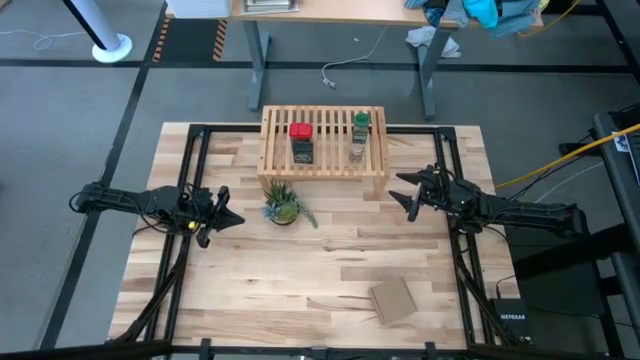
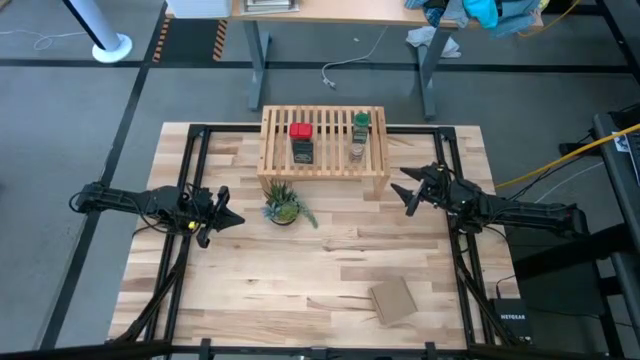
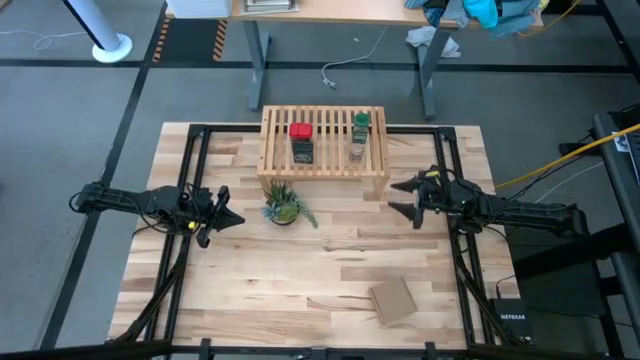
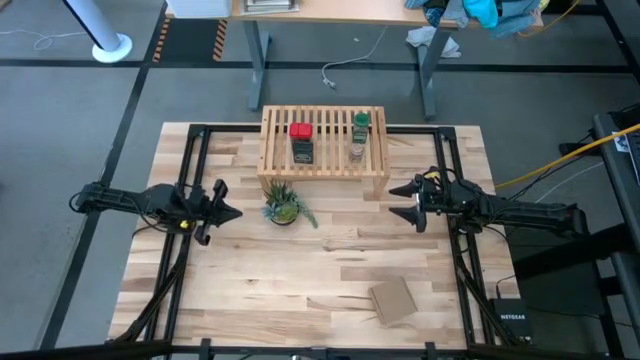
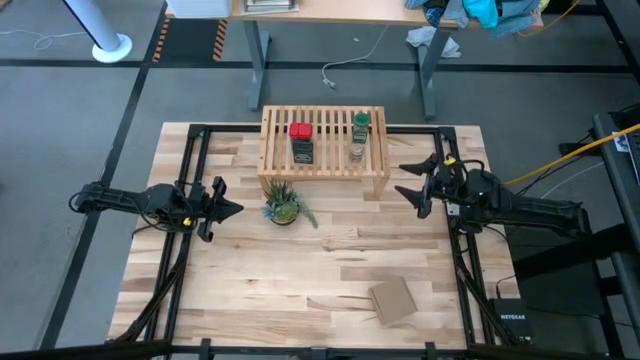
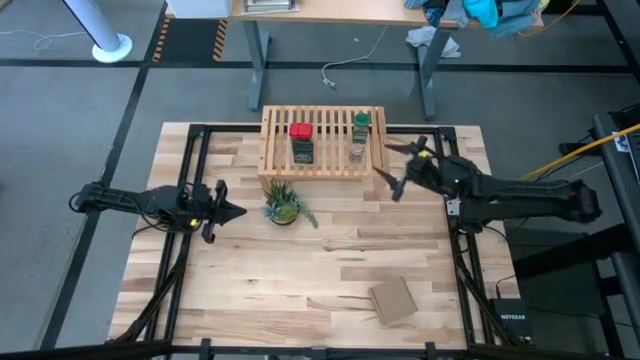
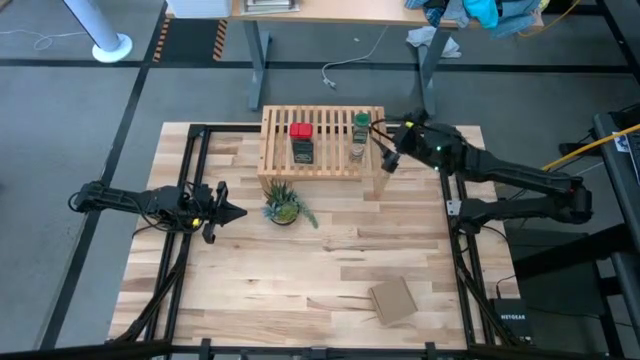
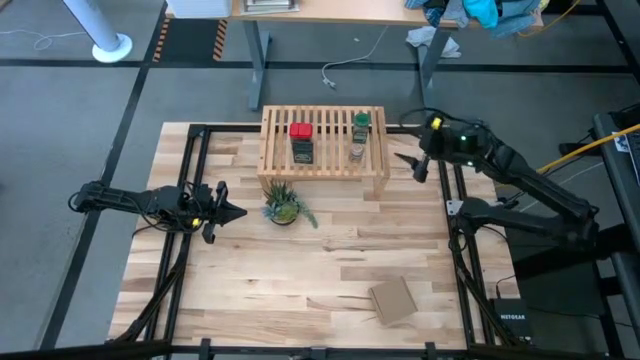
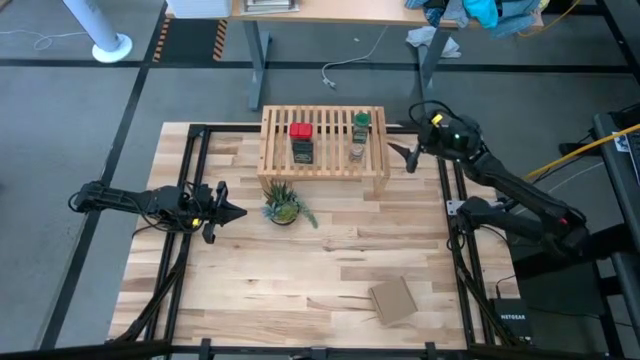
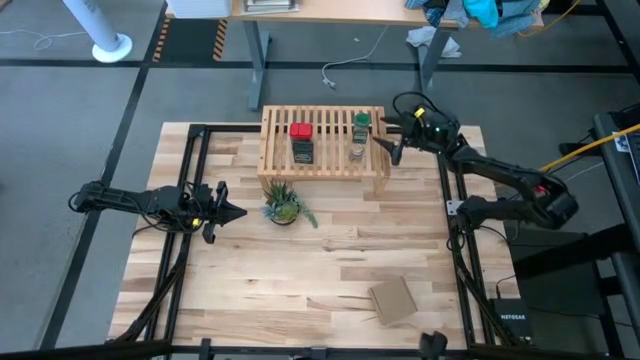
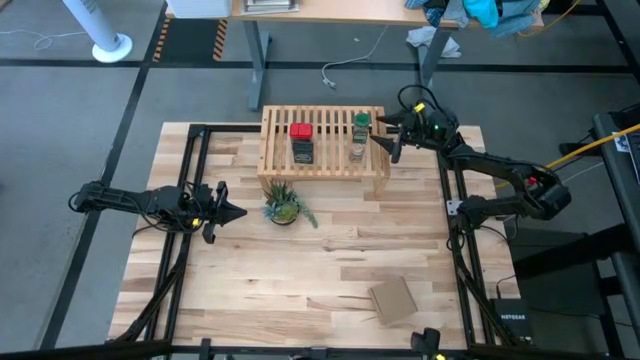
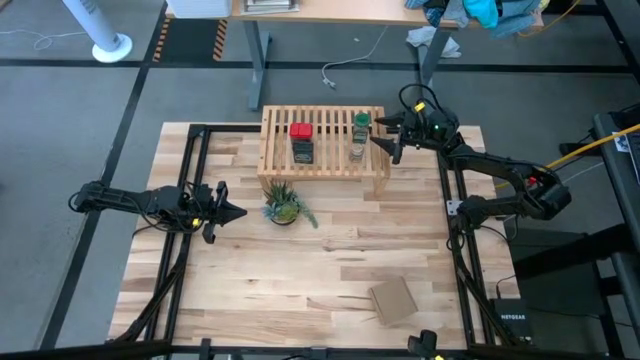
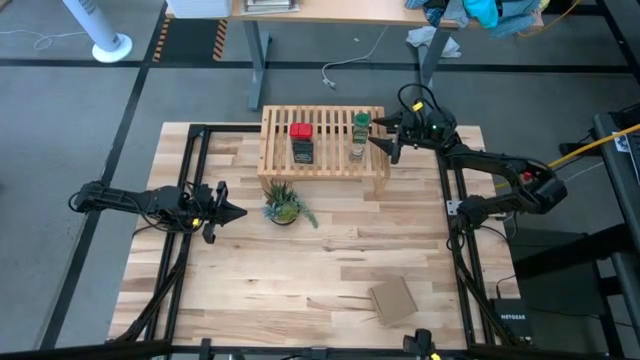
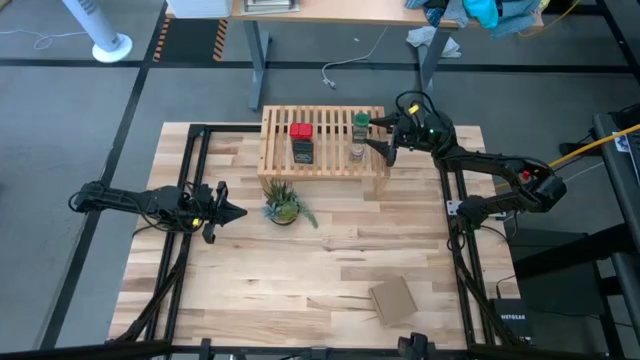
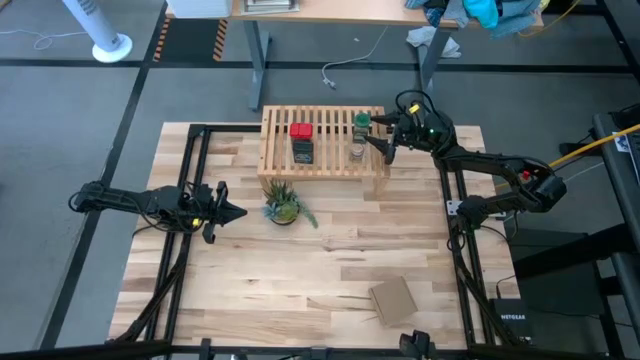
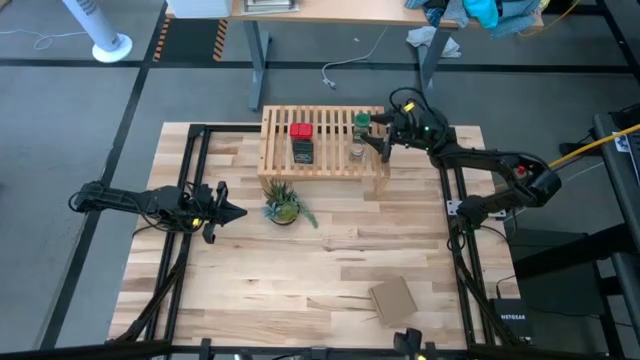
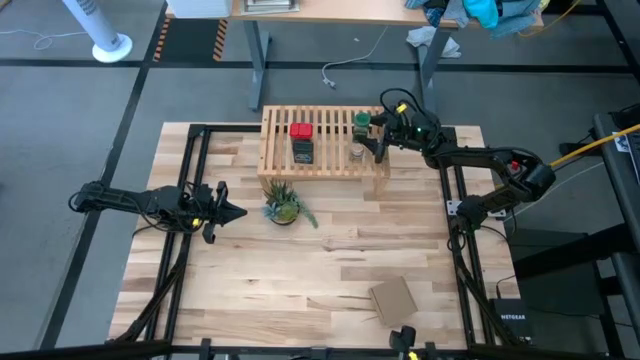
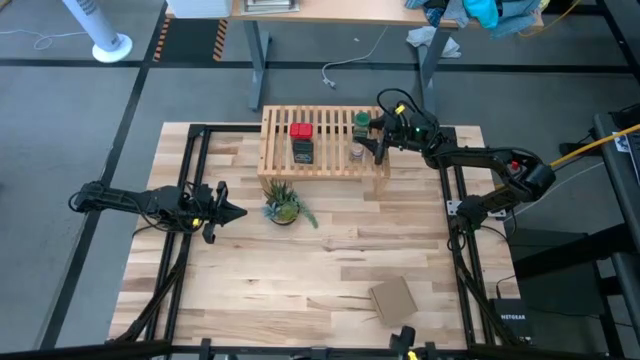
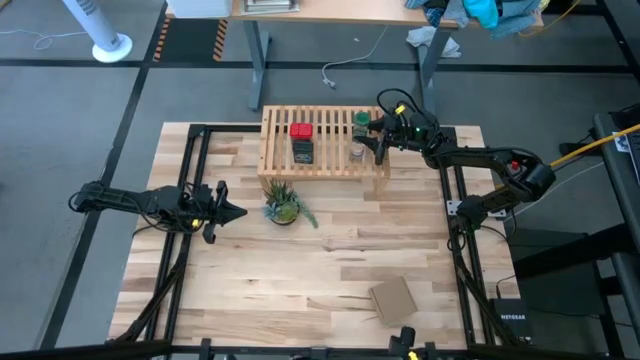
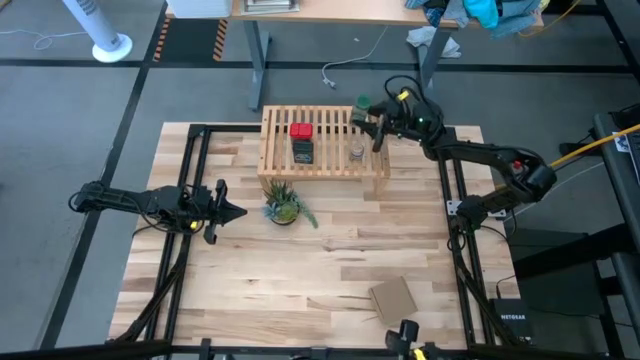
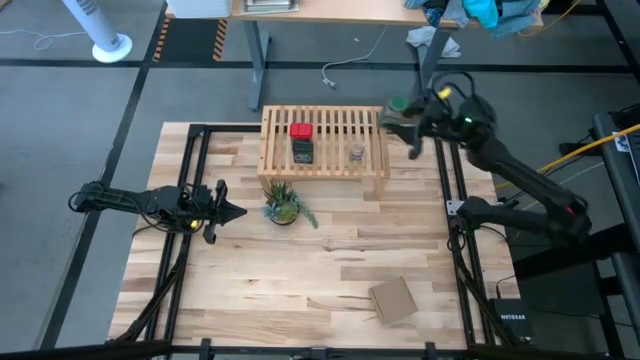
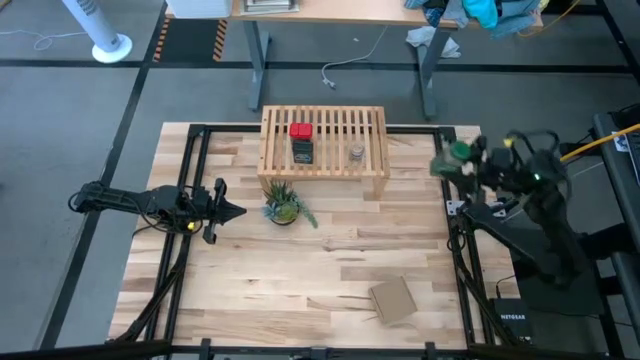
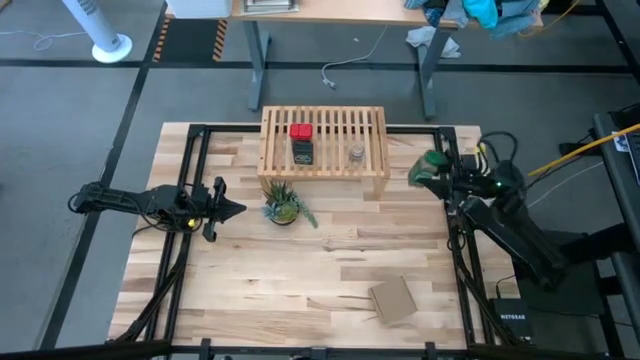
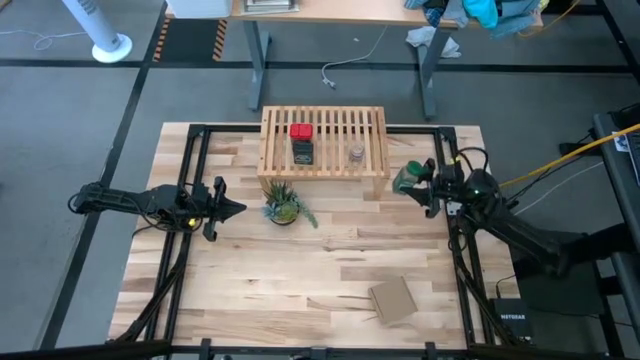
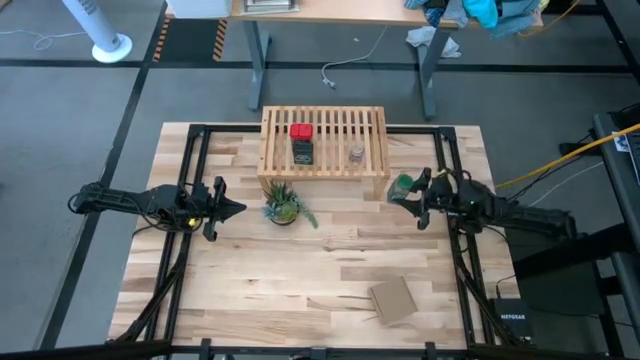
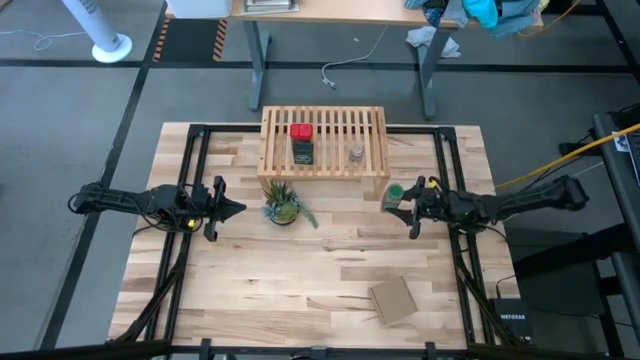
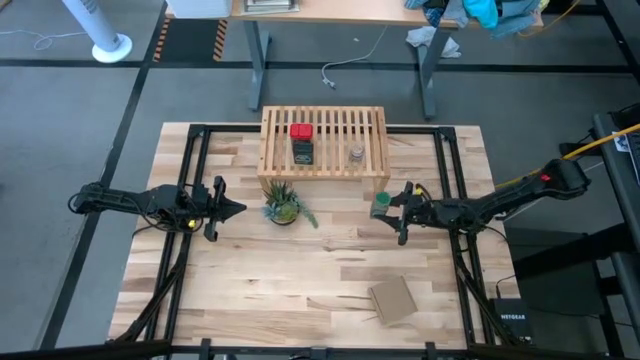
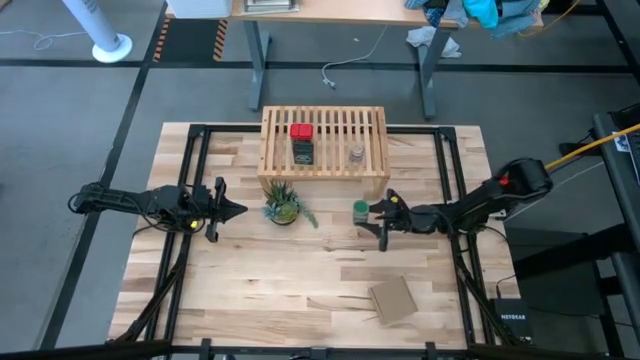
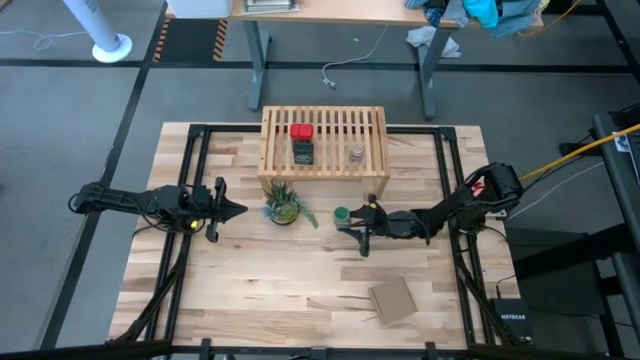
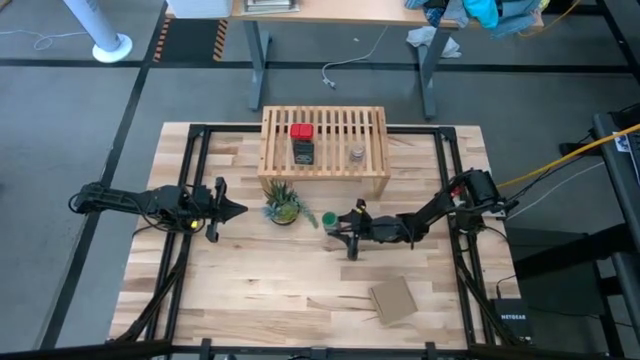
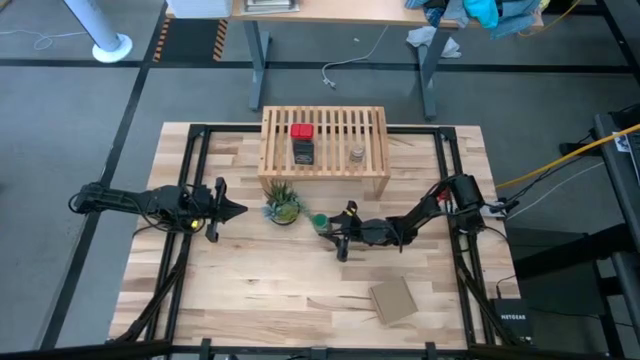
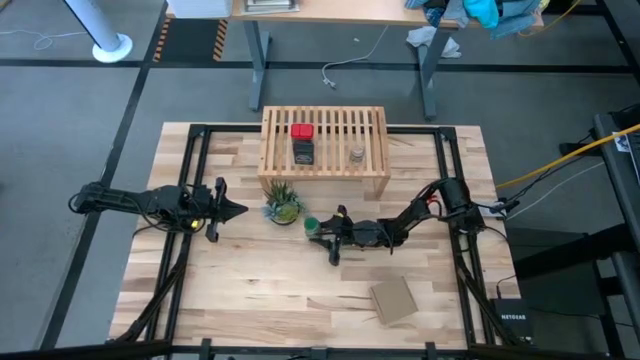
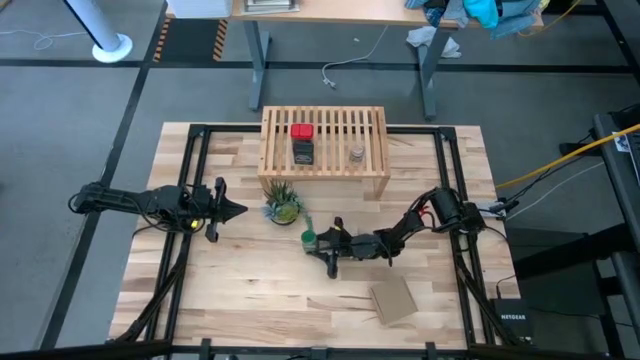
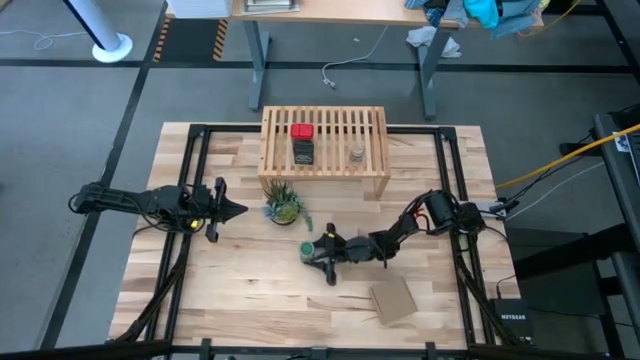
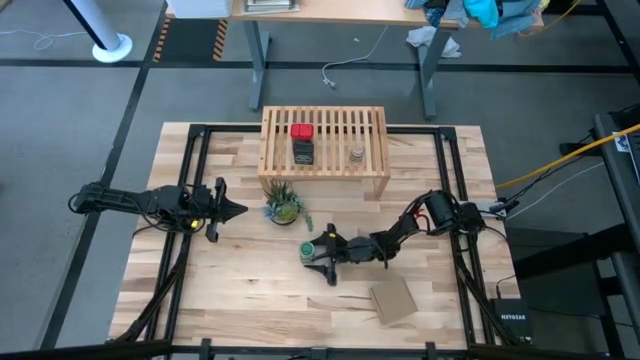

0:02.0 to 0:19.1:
Task: Shelf spices
Remove the green seasoning bottle from the shelf
